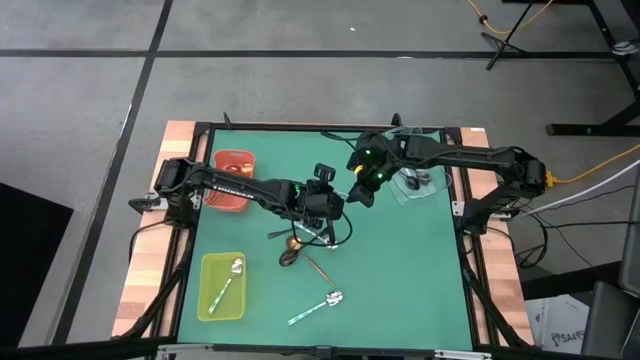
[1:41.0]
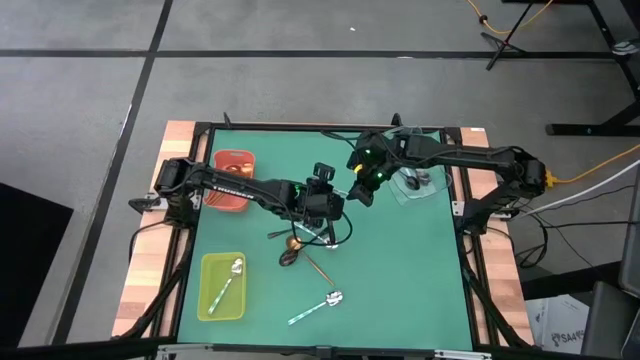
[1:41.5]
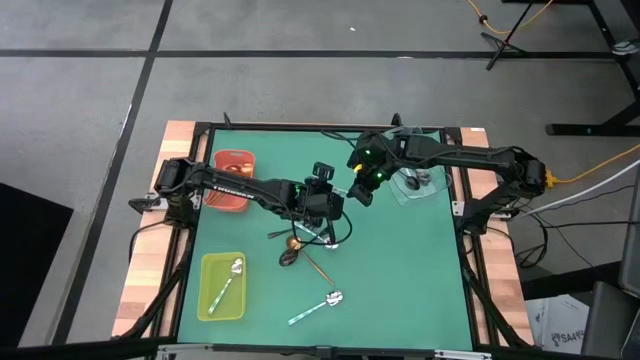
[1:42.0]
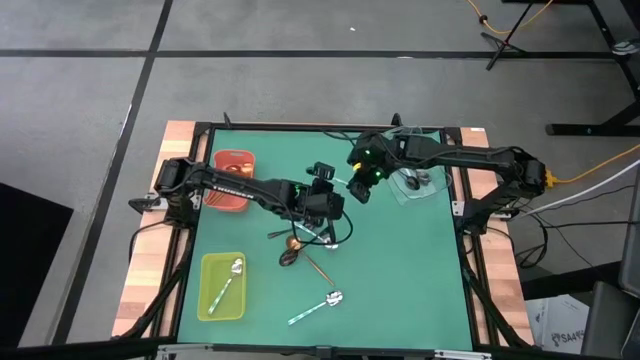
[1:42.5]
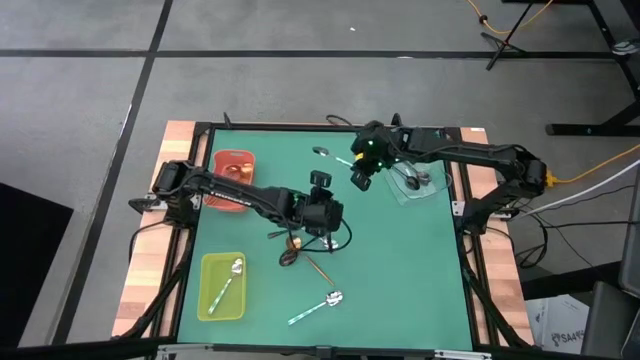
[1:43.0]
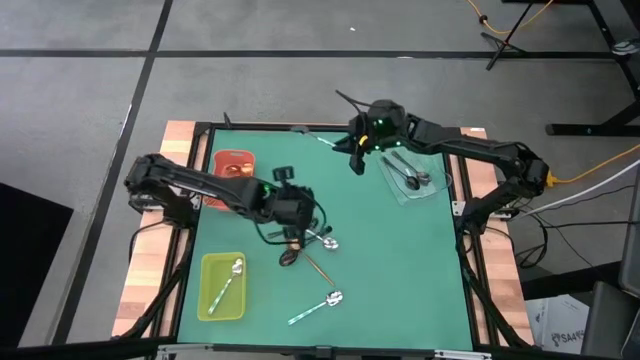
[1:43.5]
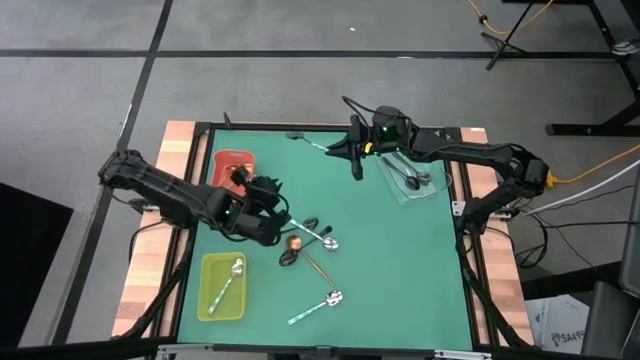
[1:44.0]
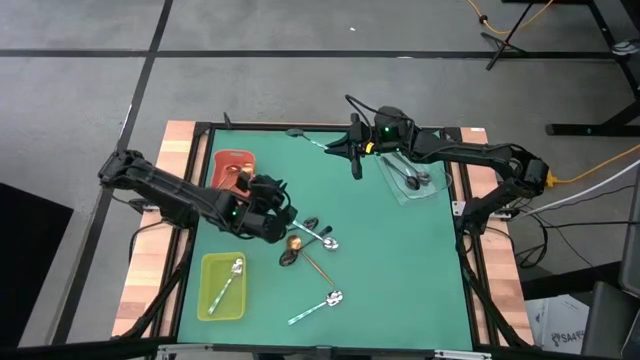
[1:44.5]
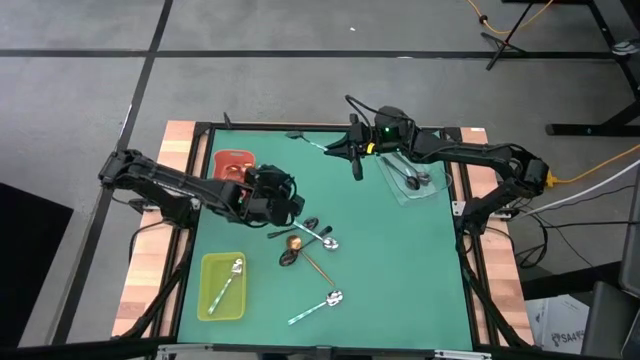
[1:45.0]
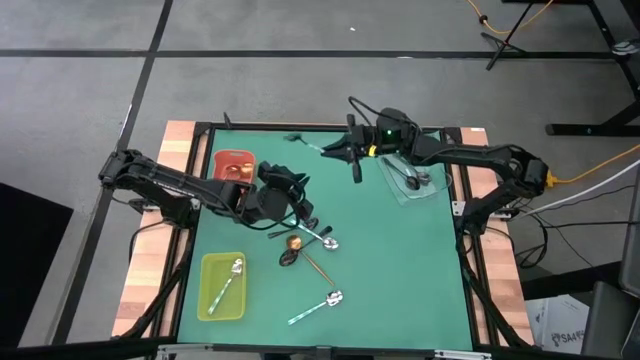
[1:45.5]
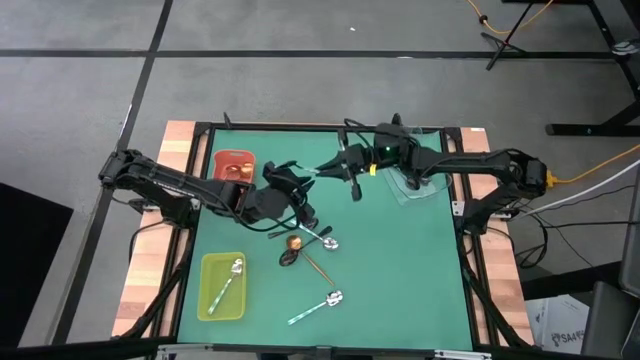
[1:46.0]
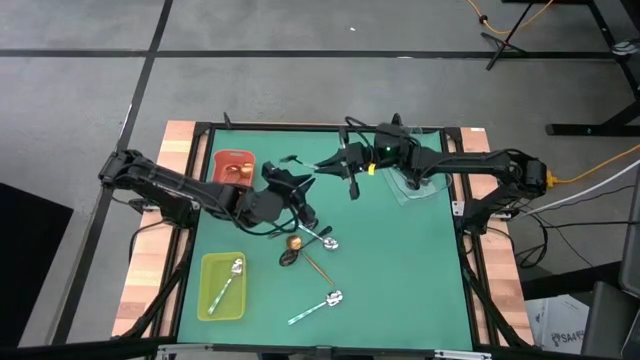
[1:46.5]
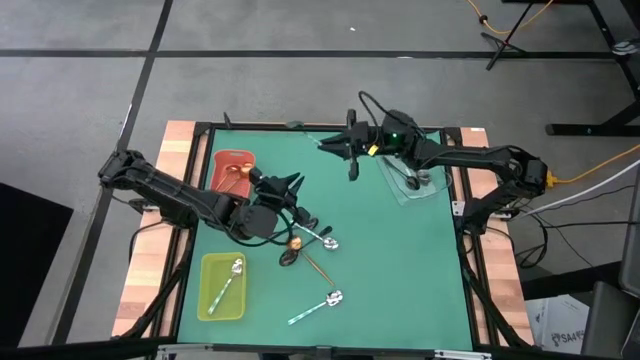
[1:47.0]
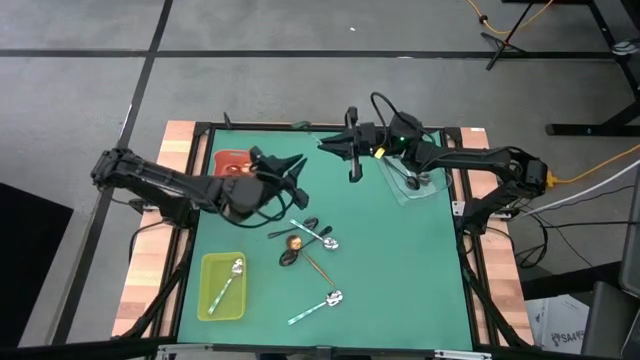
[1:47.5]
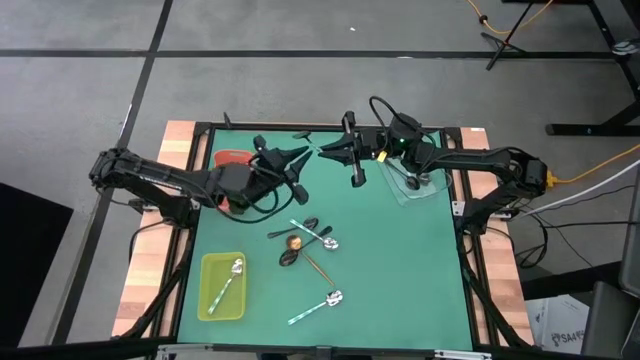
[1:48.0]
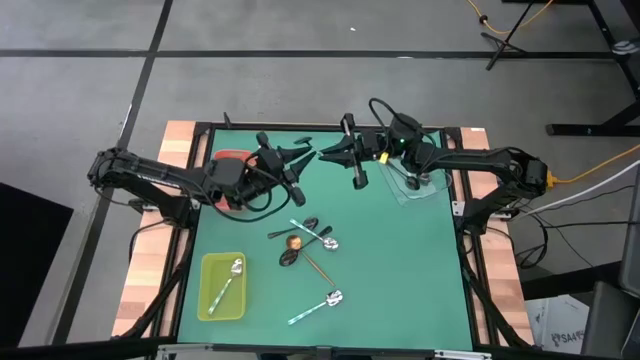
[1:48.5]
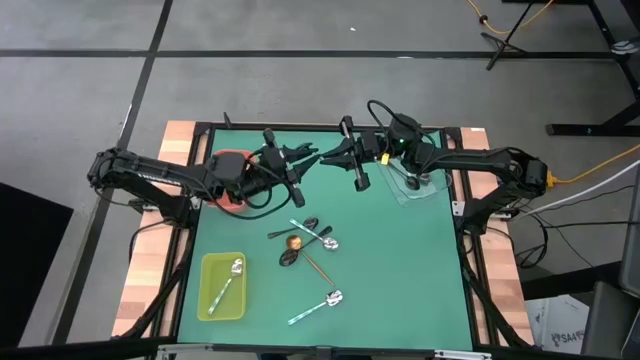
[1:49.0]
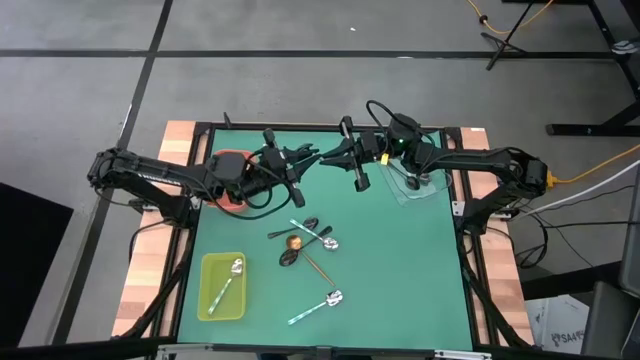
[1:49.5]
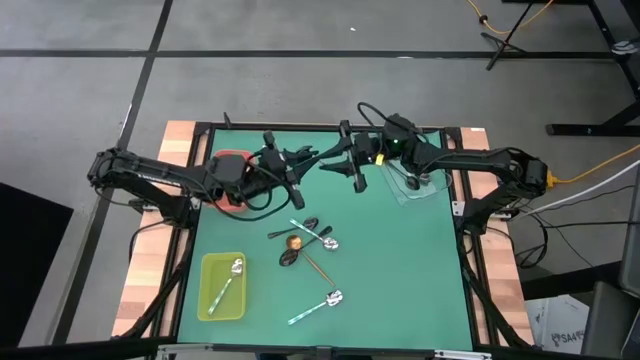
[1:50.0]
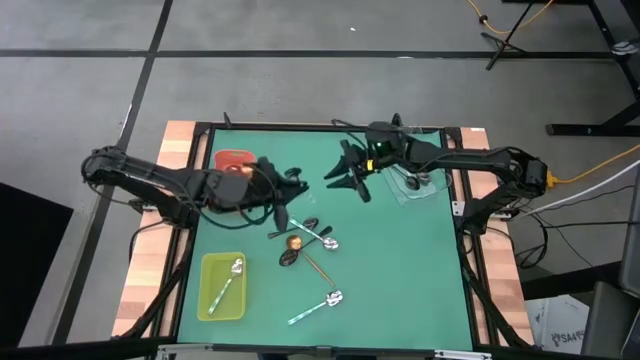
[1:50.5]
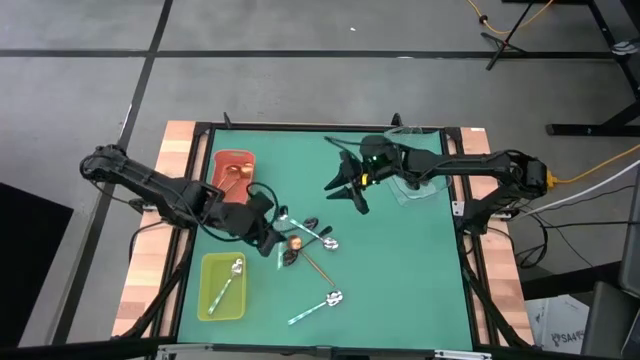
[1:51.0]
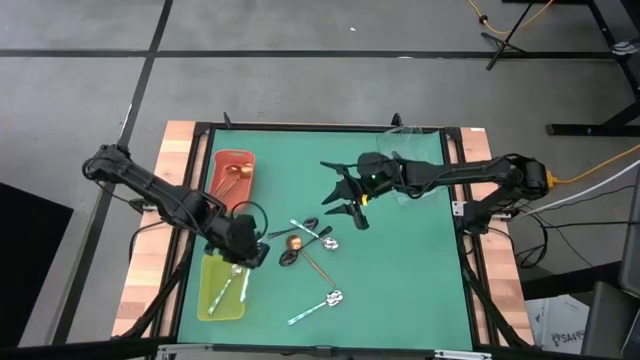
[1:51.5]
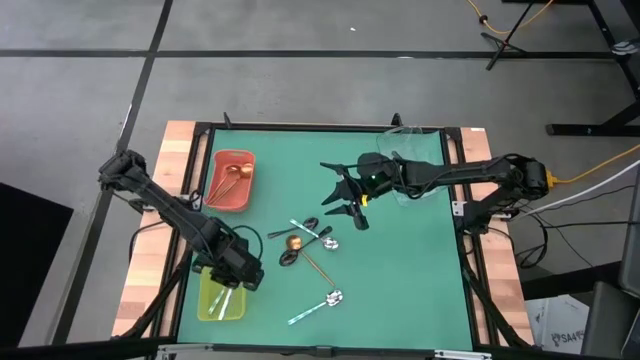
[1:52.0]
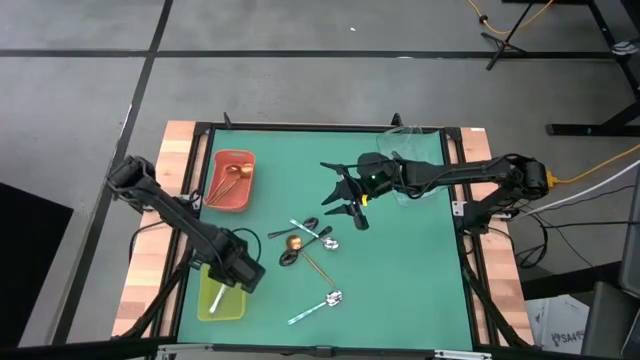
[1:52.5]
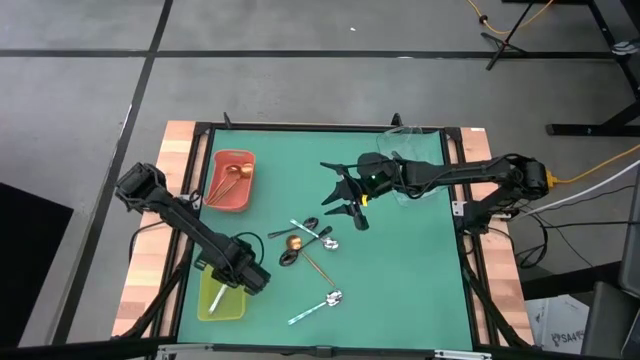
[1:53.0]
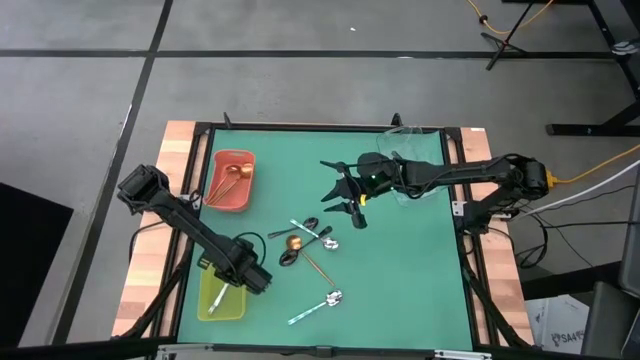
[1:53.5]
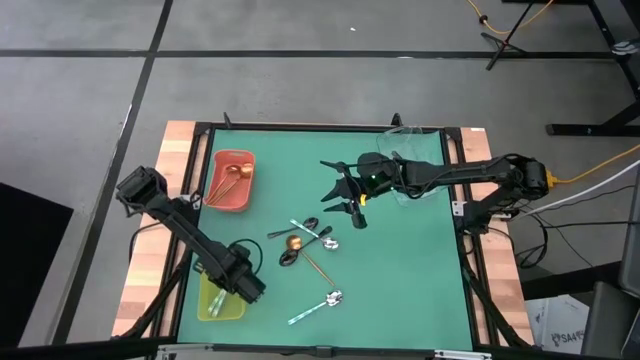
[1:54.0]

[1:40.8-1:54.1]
Task: Sort silverware by color (type)
Put the blue patterned spoon into the yellow bin

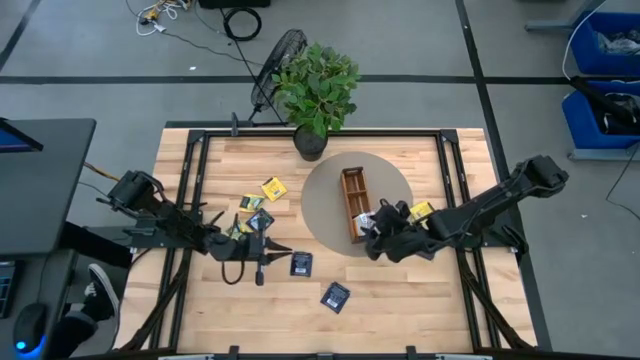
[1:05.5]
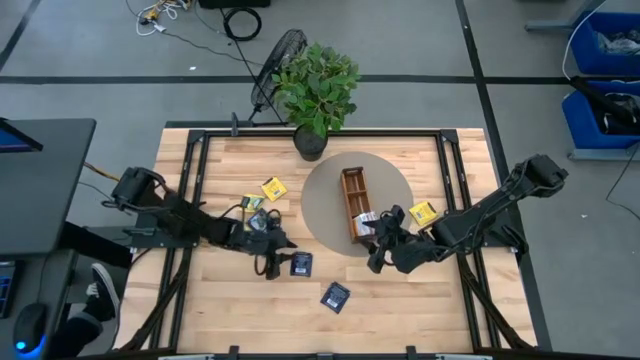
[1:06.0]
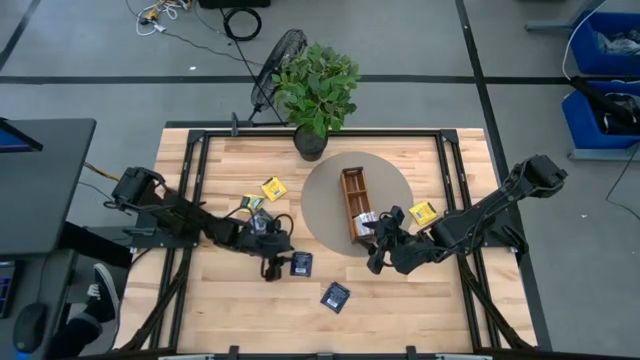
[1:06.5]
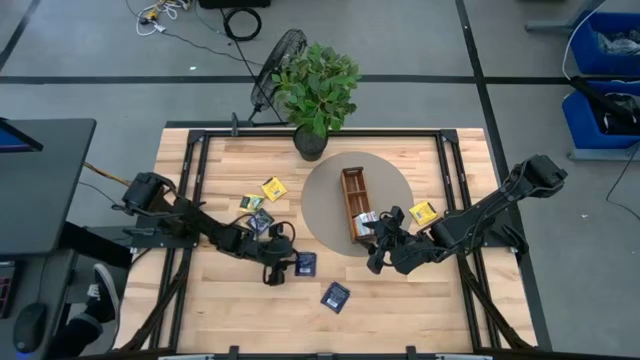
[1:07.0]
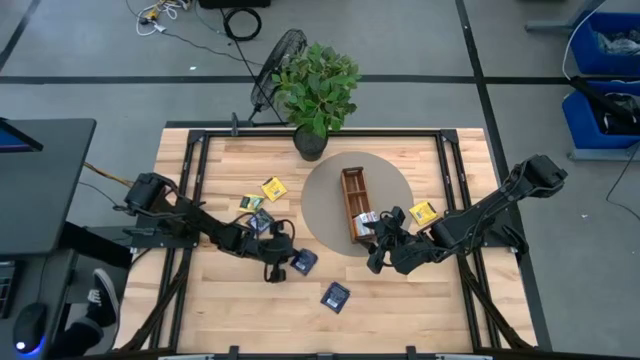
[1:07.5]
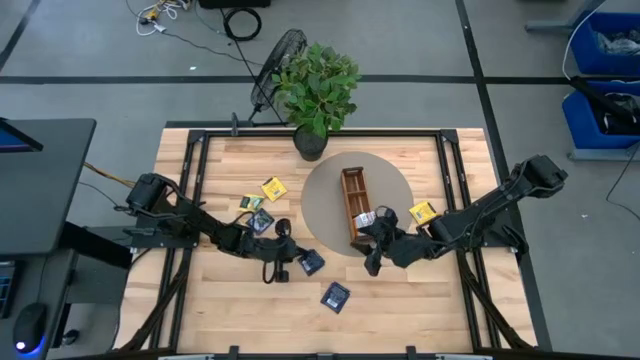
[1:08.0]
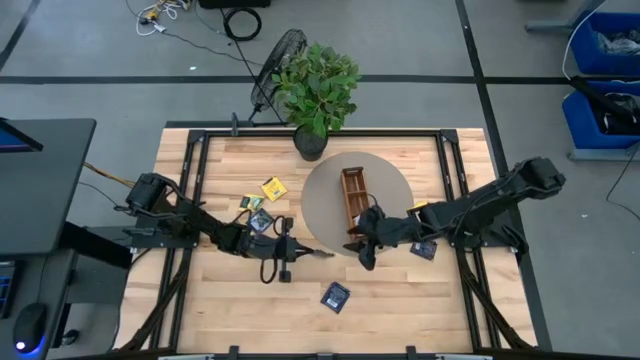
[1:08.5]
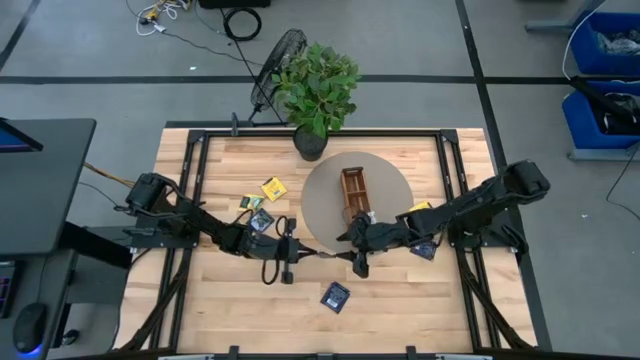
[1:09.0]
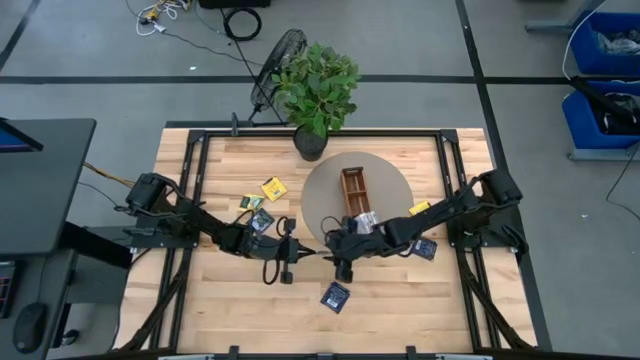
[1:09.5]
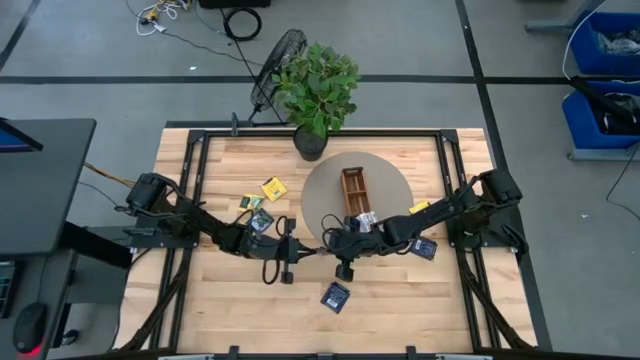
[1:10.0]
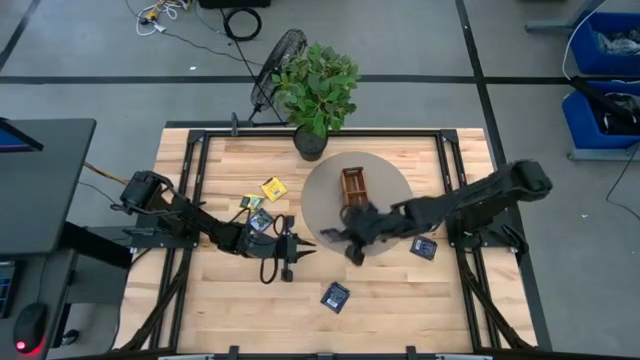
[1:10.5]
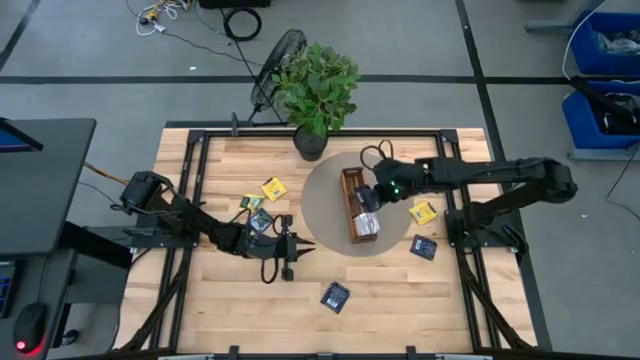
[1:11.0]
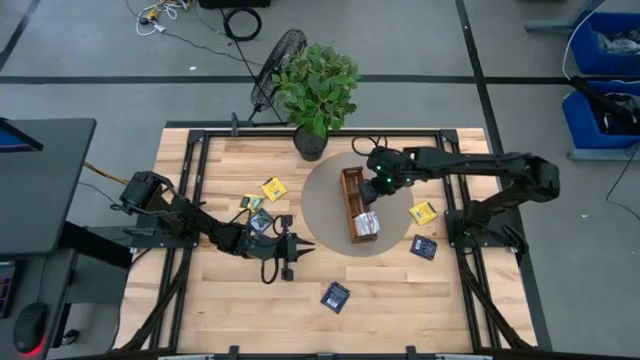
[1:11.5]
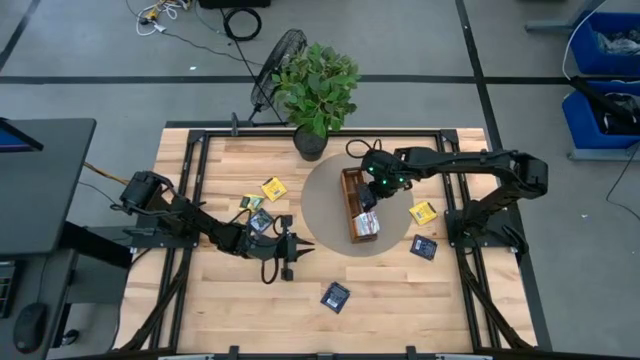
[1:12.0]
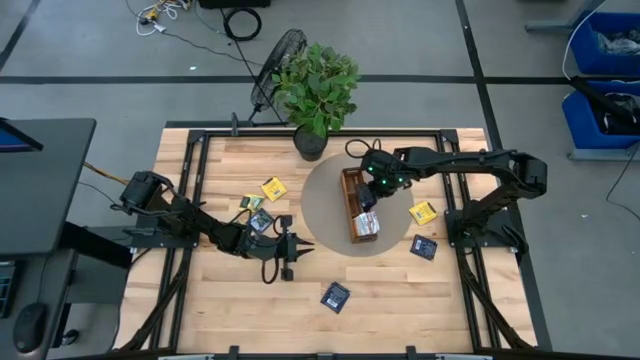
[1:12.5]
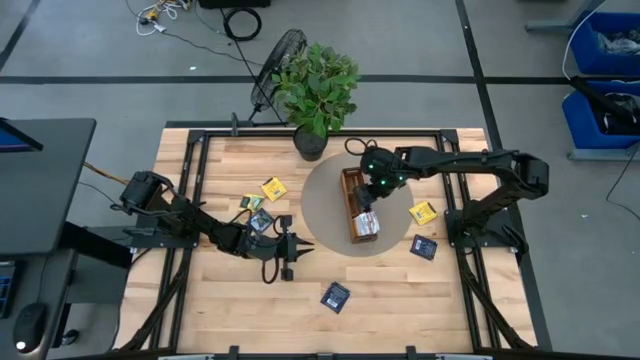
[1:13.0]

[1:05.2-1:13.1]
Task: Pick & Place Tea
Put the purple tea bag into the middle section of the wooden organizer
